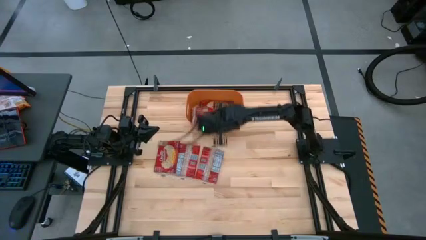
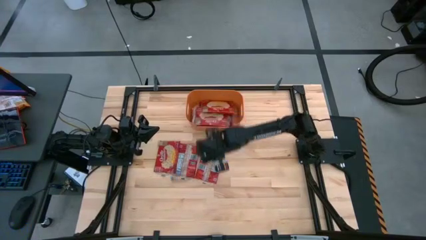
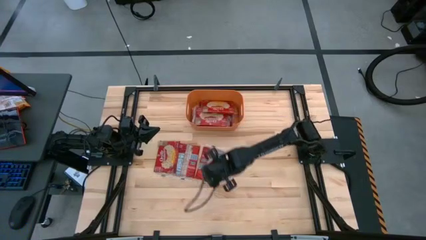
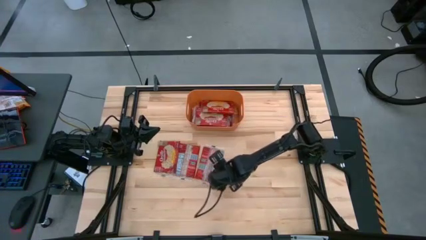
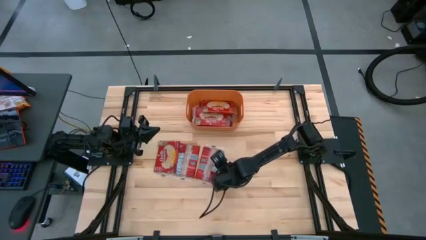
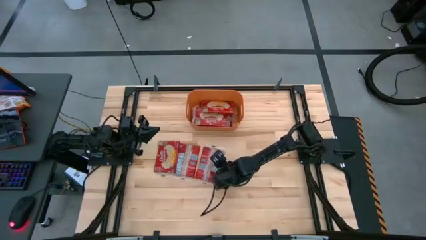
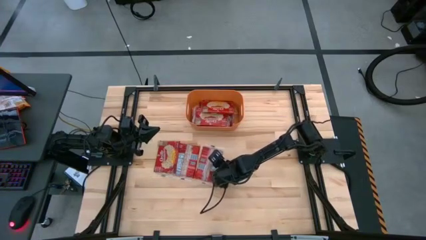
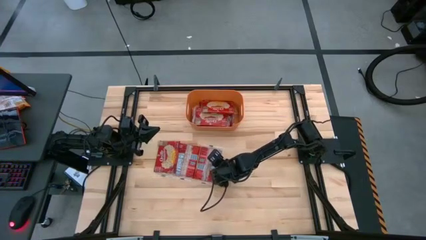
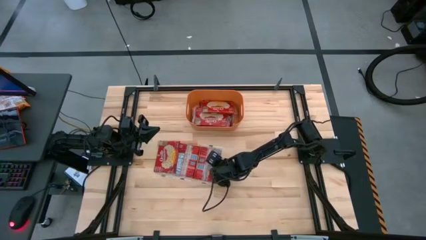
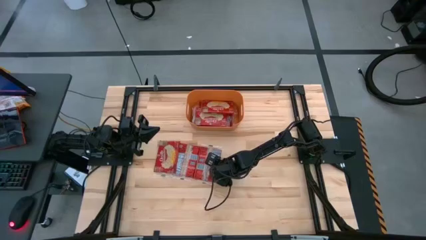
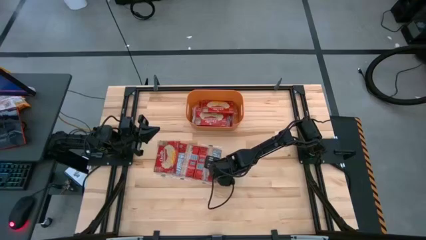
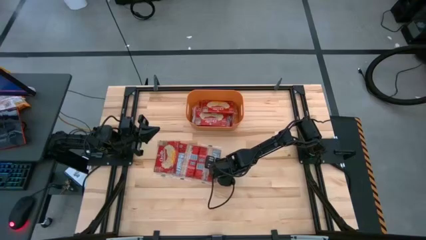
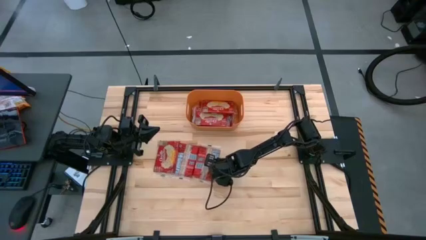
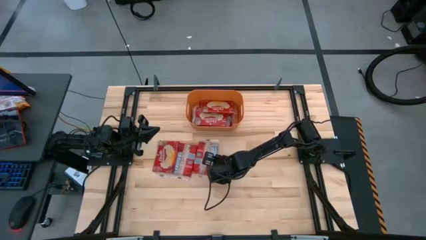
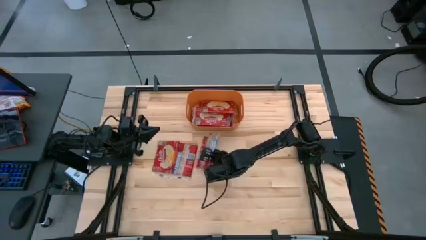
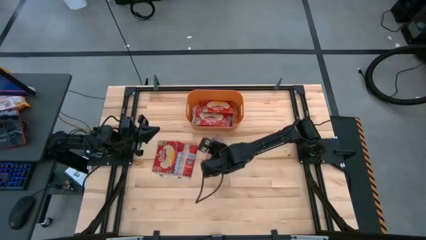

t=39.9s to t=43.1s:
Task: Sort popcorn bags into baskets
Put the red popcorn bag into the orange bin

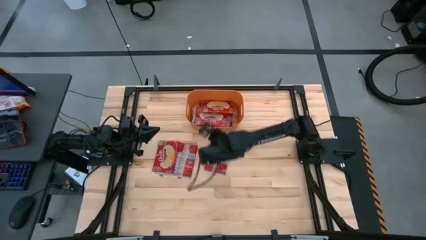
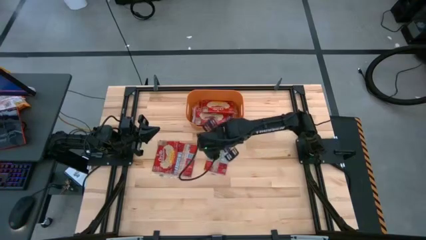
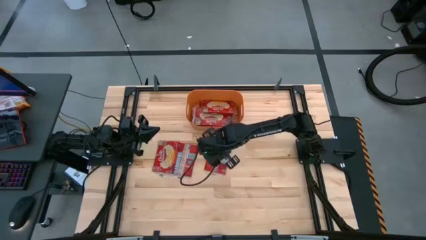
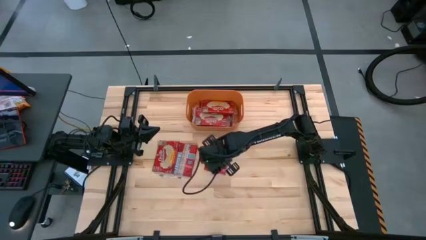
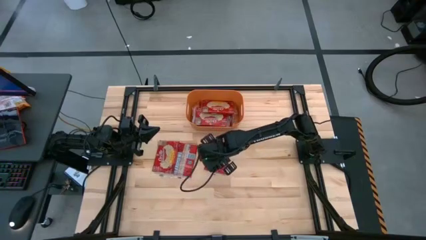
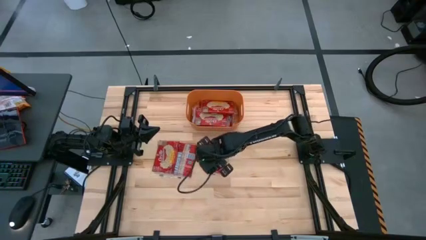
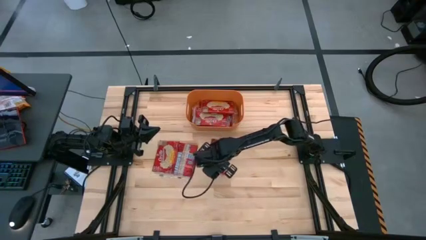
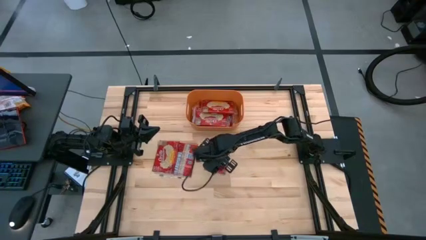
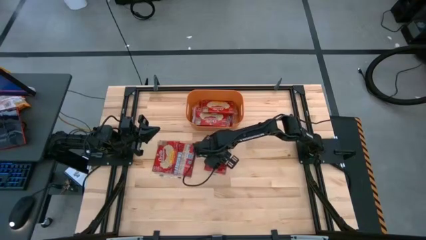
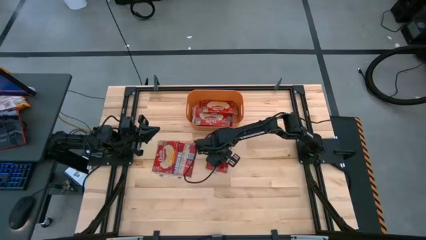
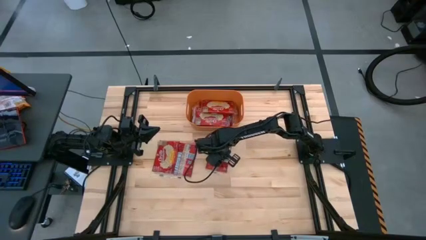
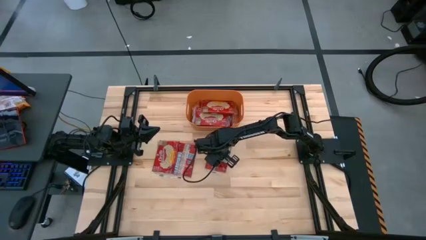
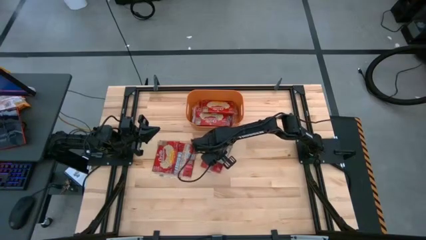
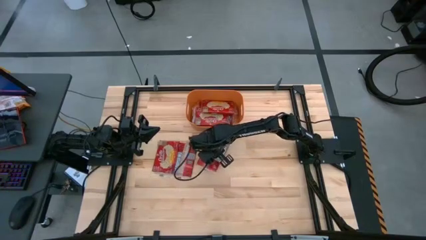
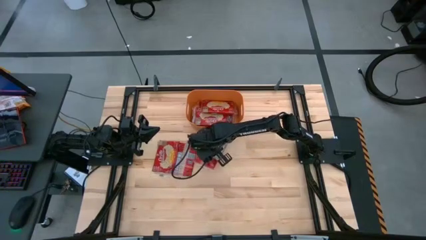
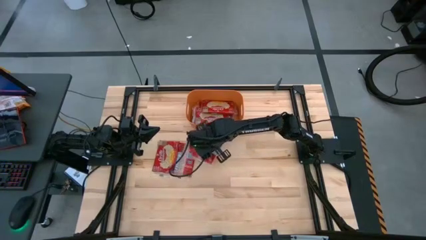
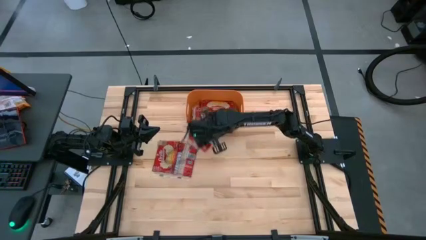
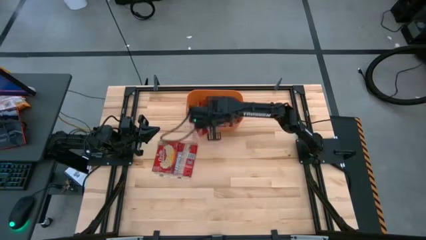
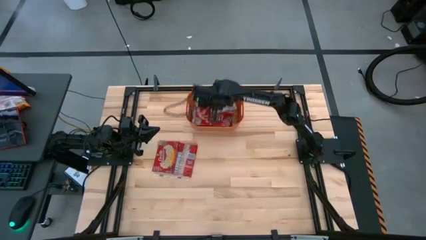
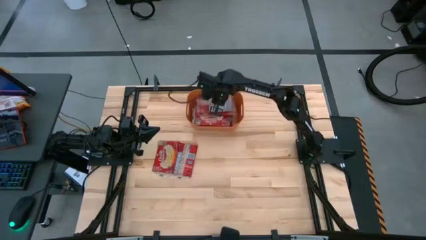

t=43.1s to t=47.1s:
Put the red popcorn bag into the orange bin

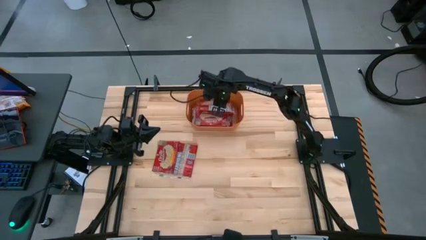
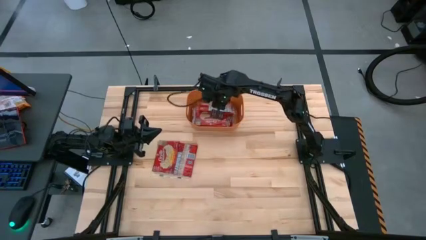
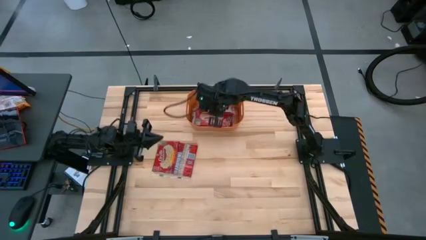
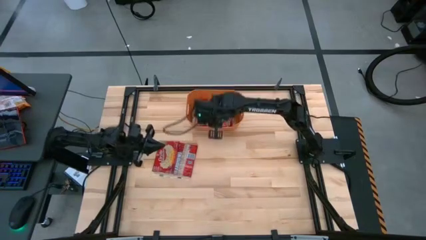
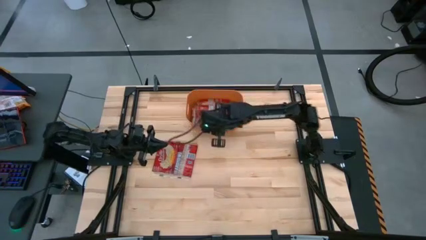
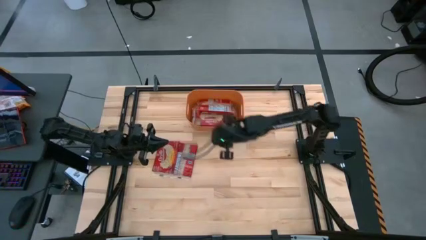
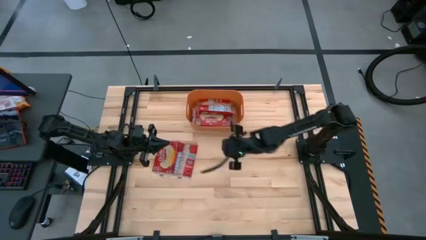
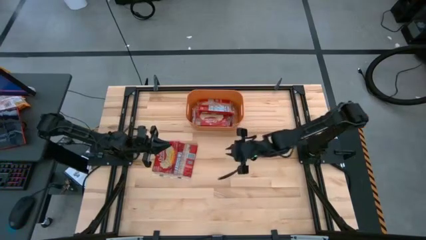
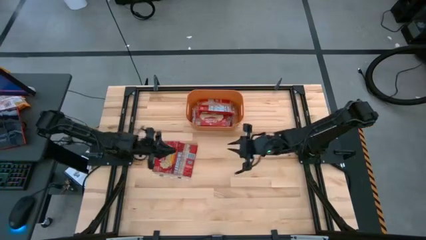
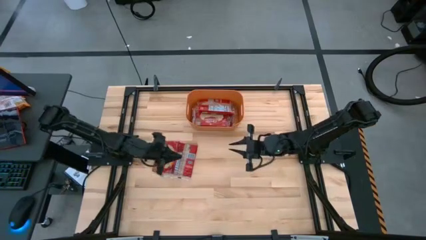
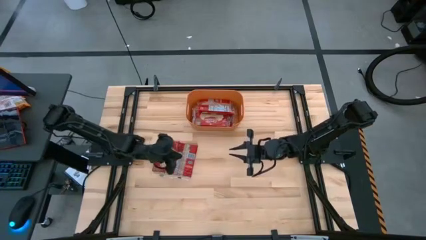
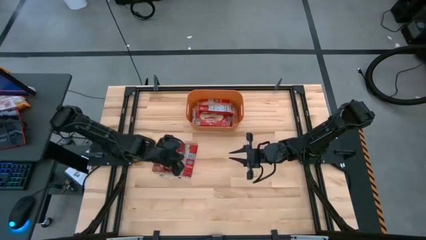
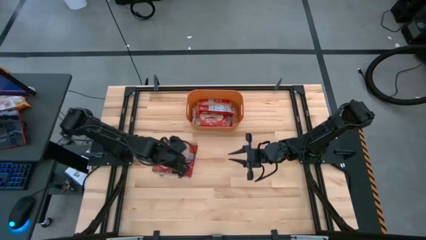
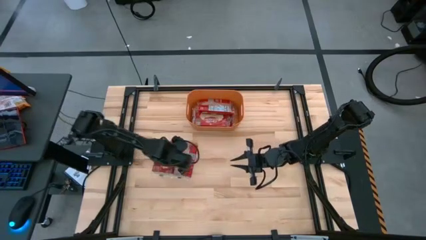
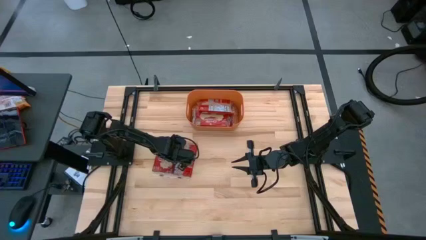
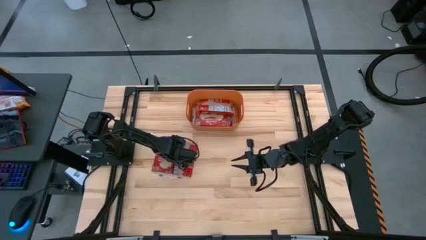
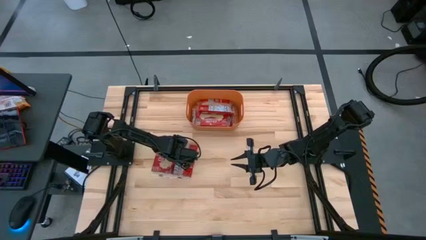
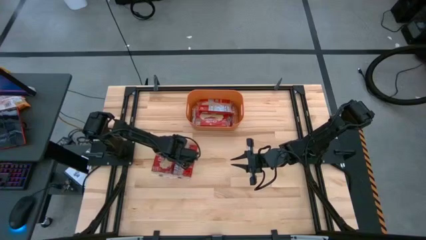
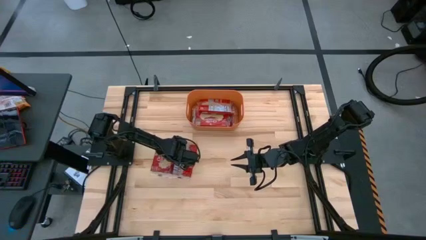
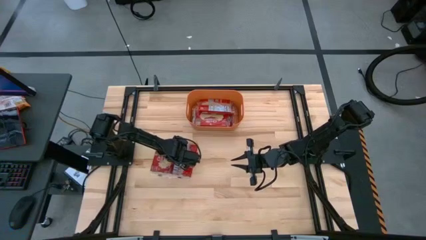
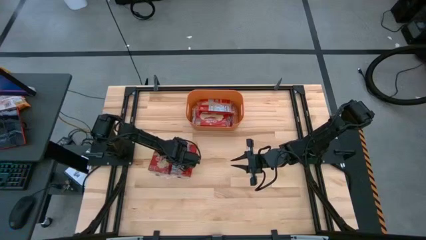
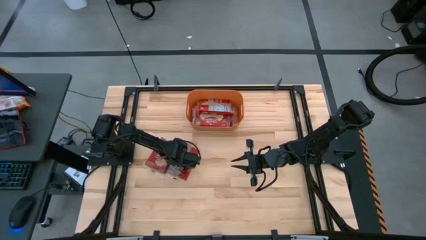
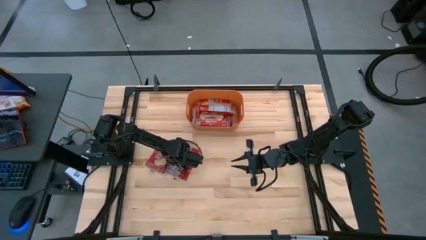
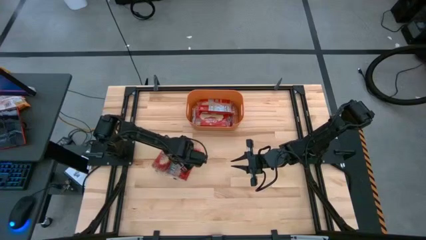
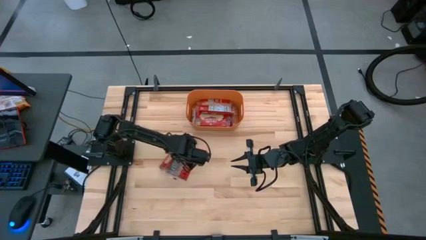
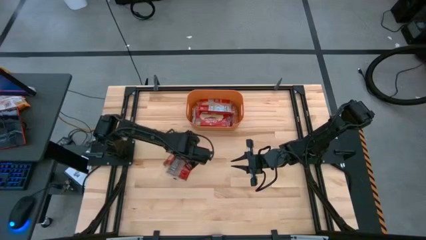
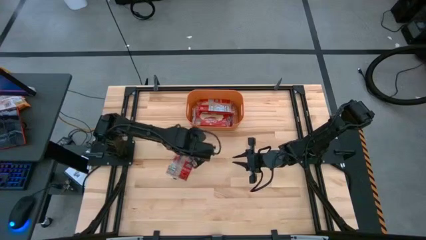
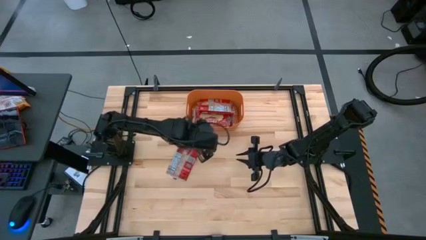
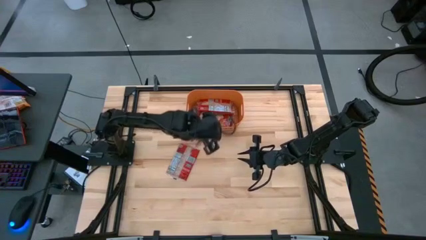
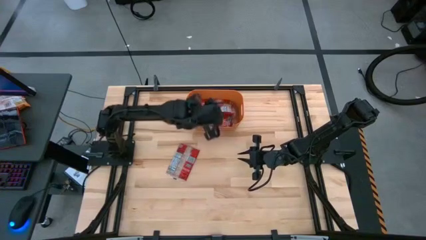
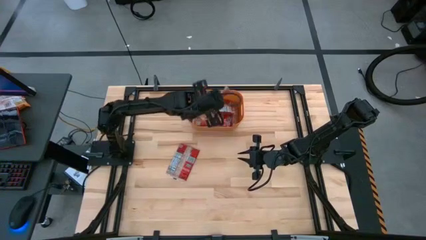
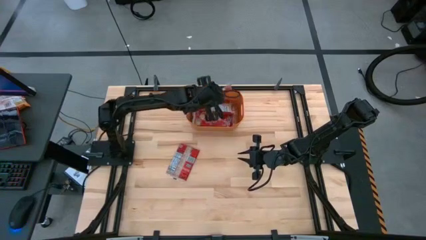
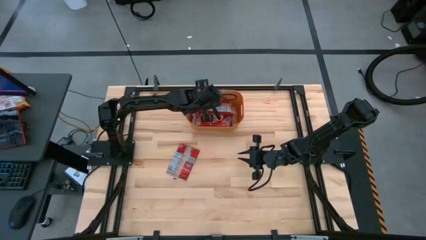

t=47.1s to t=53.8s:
Put the red popcorn bag into the orange bin

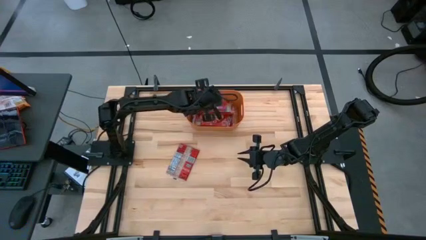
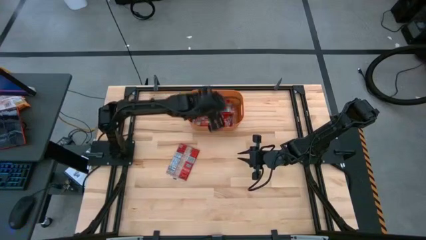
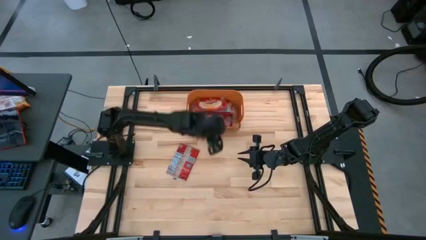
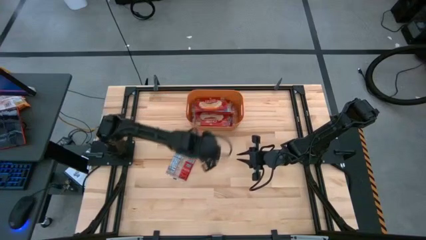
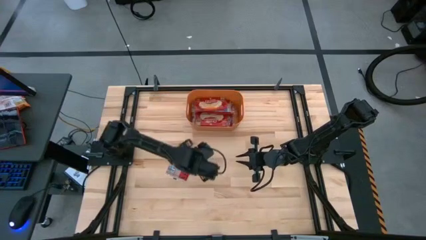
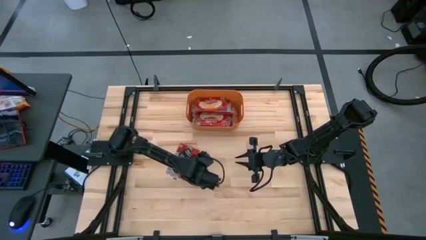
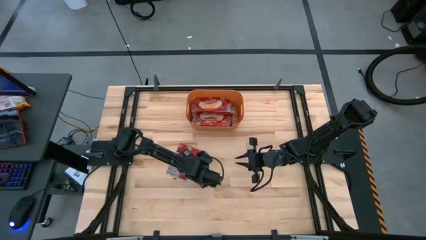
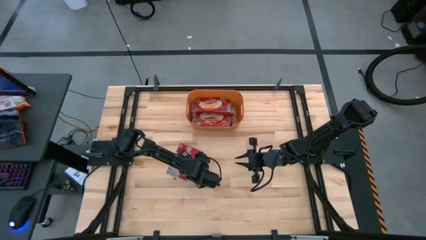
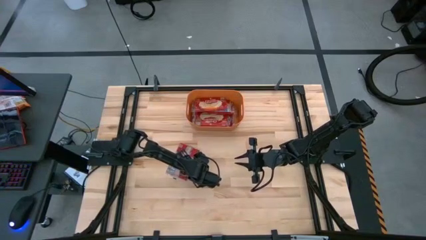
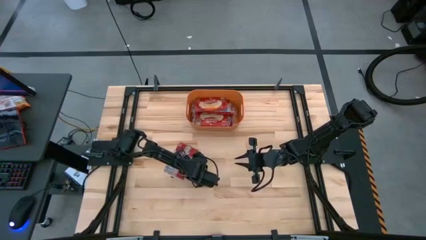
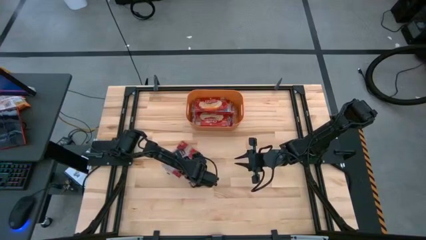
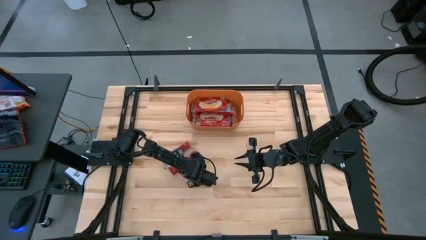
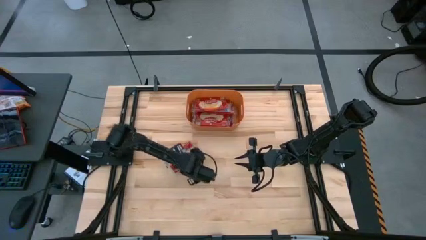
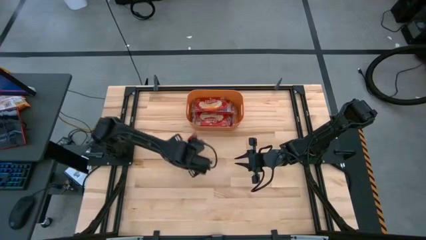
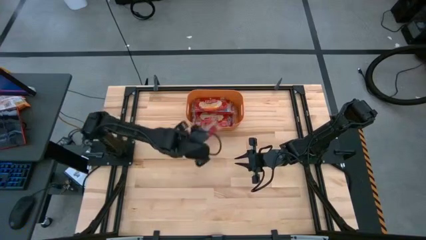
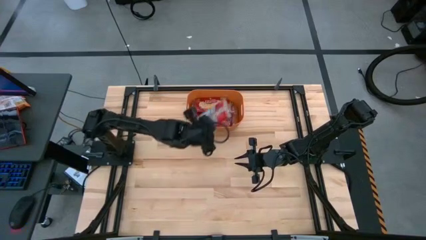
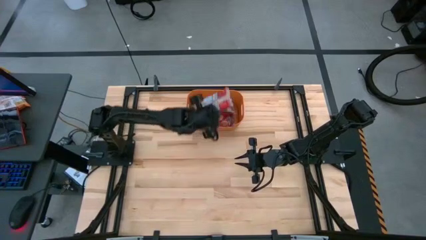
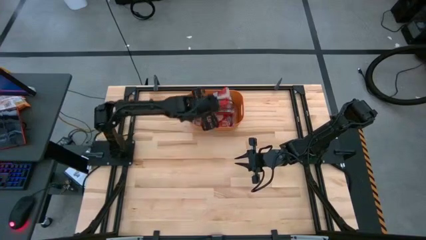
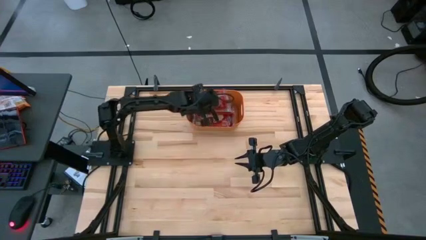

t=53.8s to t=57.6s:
Put the red popcorn bag into the orange bin
